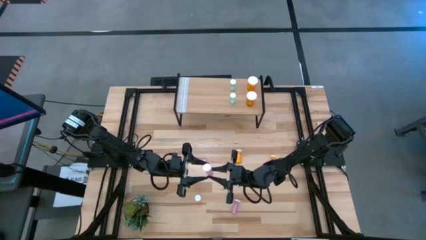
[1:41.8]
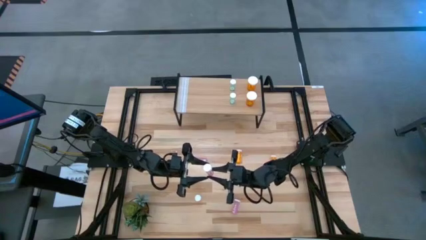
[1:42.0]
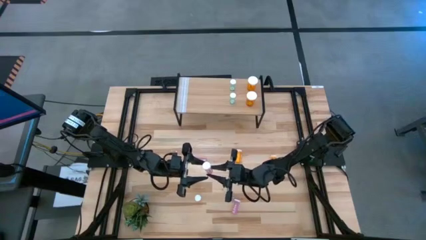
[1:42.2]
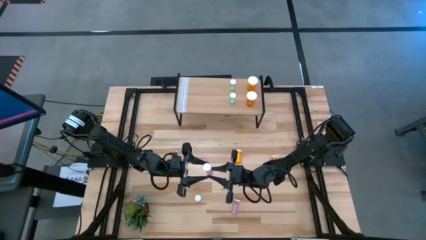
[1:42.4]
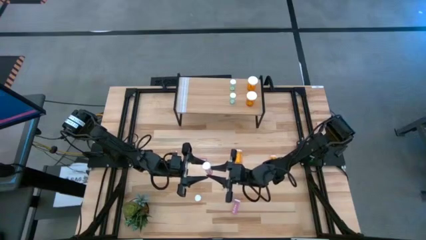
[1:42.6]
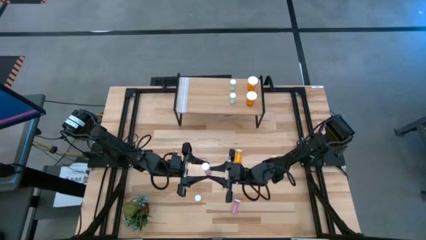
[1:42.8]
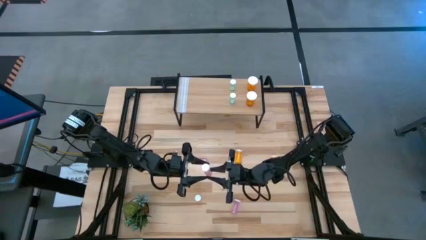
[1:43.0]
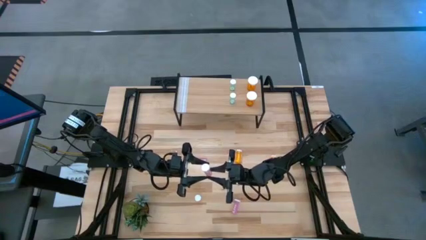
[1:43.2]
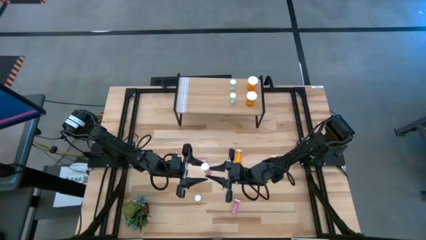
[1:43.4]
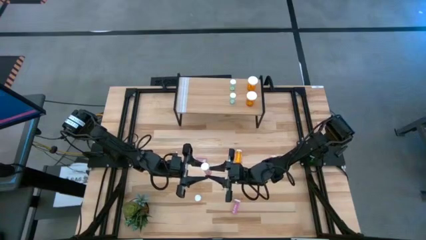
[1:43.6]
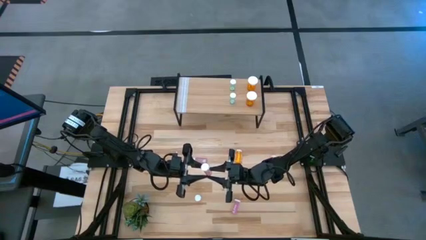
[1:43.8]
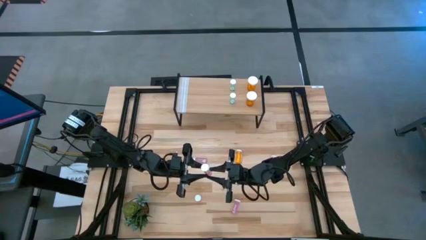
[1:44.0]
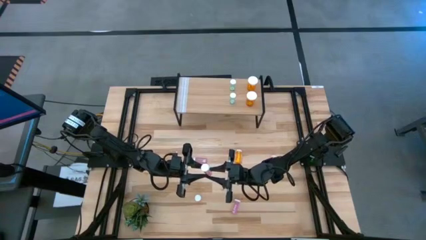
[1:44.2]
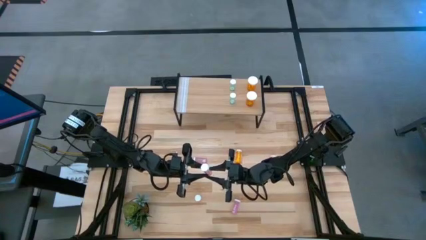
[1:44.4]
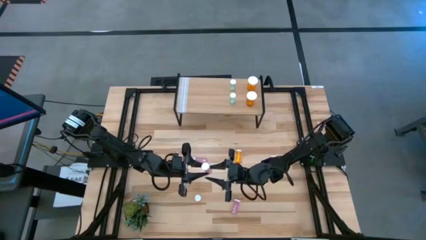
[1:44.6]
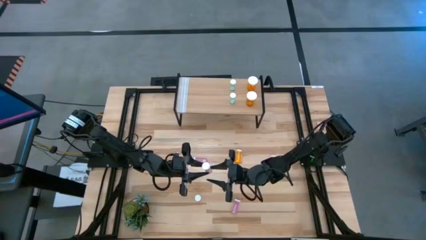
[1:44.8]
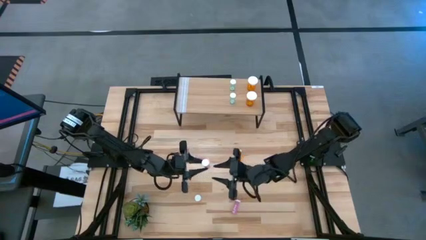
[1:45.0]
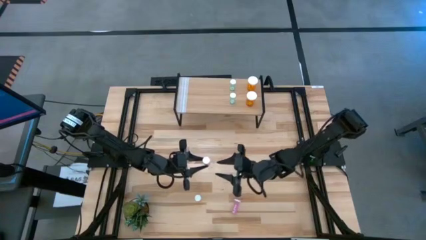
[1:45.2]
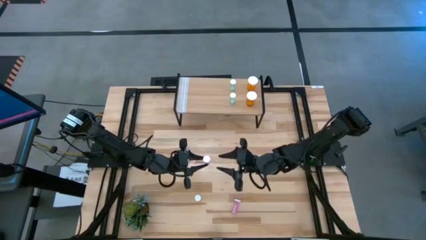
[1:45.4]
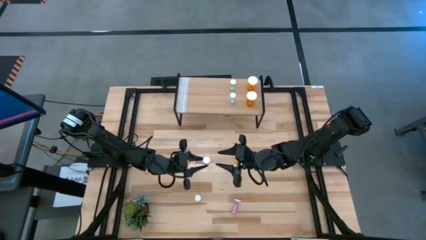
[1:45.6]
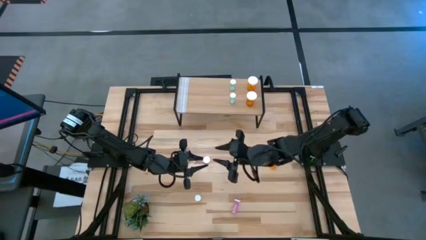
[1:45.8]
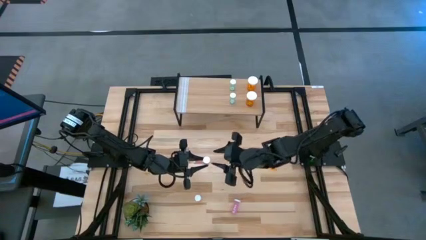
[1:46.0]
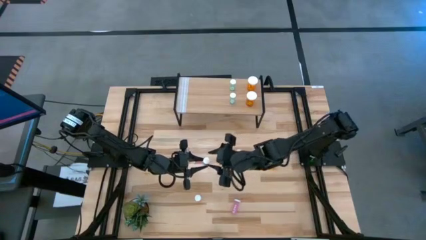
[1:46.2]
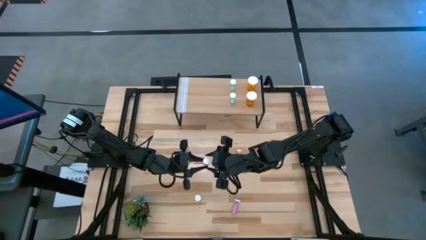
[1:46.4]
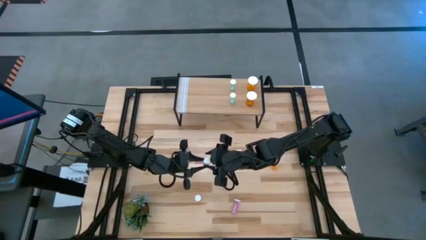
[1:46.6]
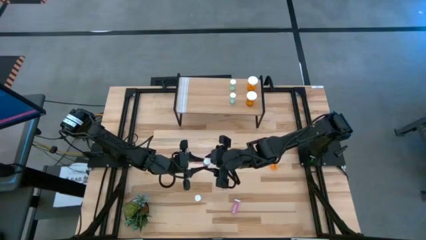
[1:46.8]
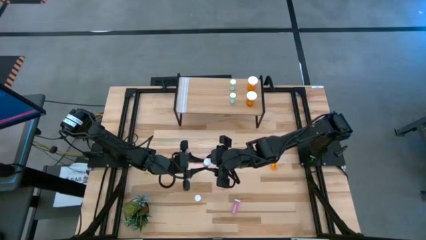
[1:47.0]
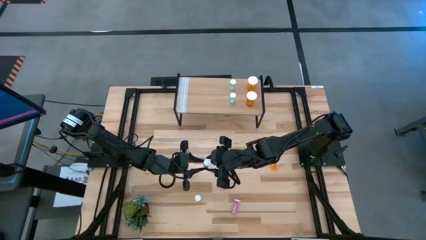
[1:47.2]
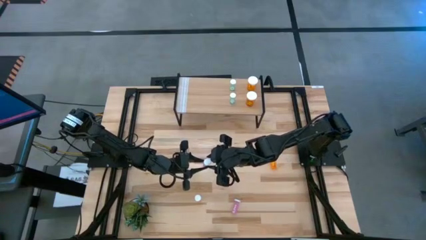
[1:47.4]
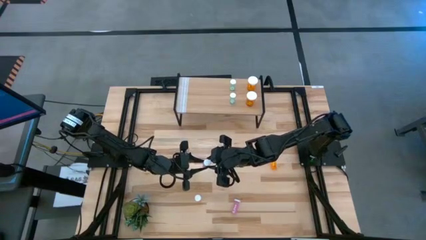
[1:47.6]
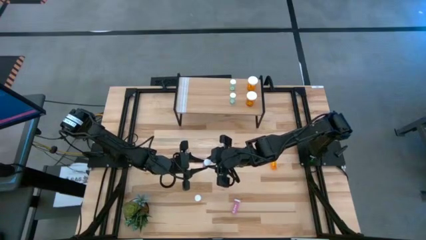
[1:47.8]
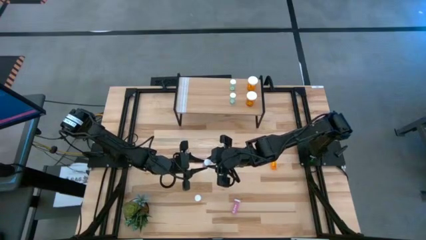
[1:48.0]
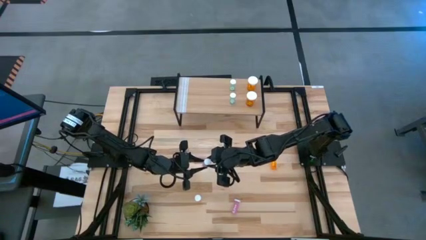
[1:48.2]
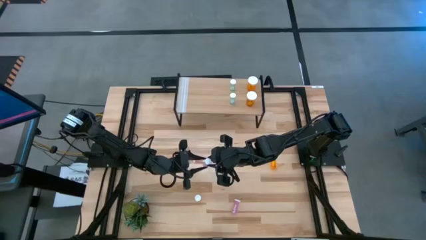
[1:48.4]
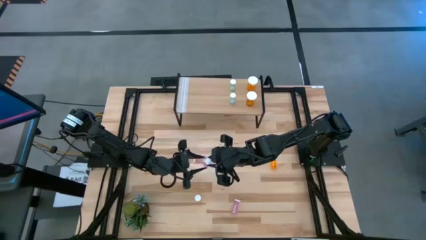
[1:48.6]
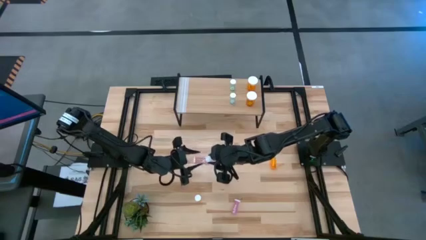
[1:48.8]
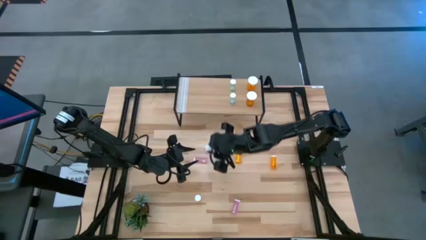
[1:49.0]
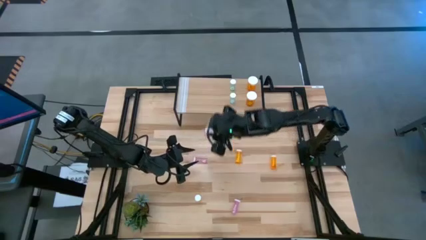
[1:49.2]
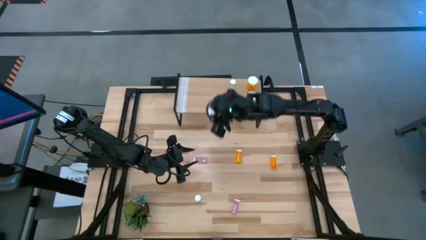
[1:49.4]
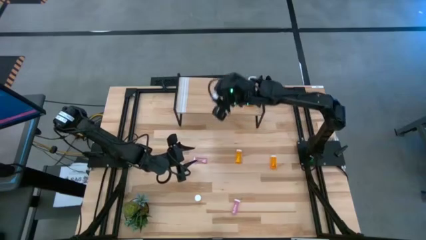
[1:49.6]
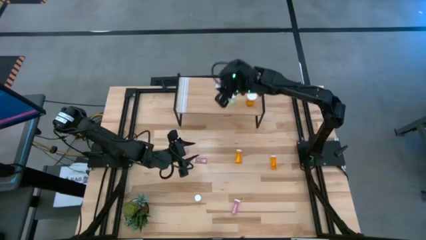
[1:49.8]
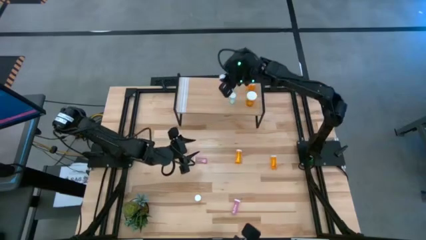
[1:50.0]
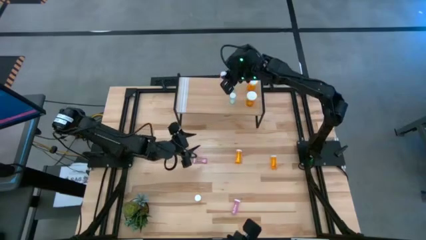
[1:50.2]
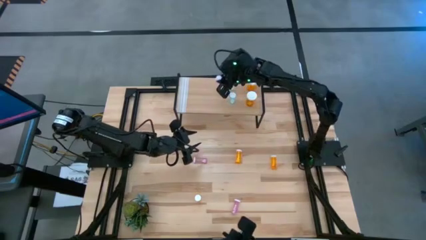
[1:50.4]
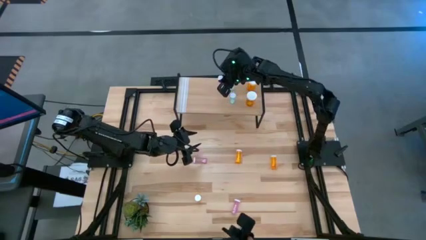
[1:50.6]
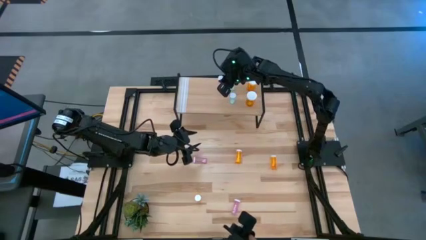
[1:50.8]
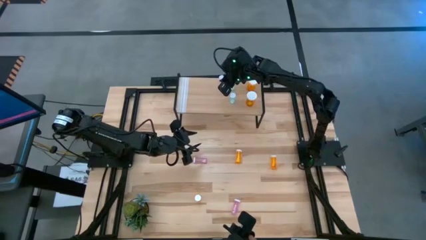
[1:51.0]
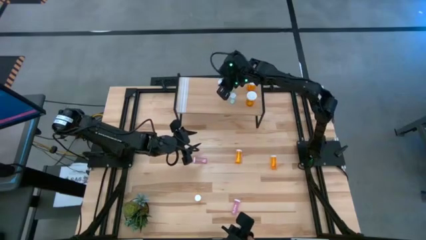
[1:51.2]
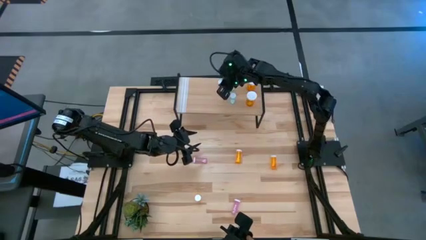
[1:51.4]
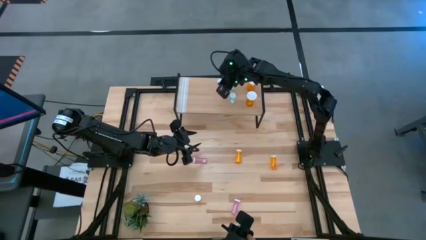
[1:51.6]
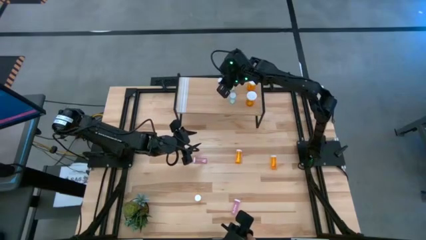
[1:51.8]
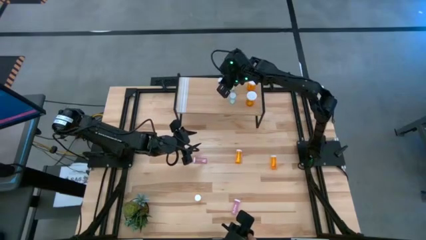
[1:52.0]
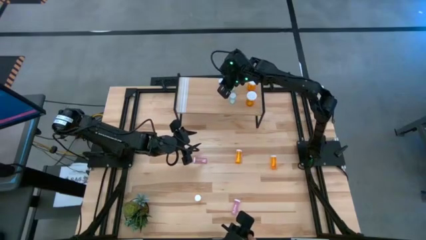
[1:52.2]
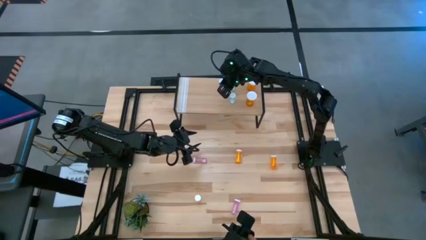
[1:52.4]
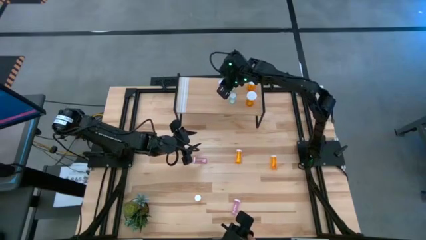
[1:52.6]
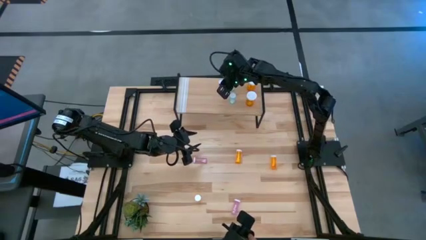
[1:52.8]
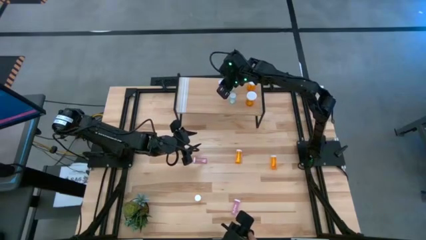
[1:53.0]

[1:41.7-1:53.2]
Task: Pick and place medicine bottles onto shelf by color
Put the bottom right pink pill bottle on the shelf
